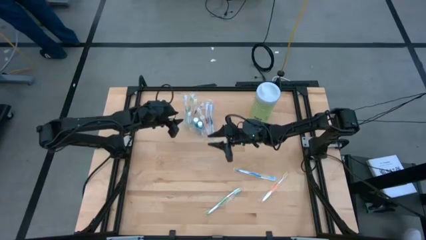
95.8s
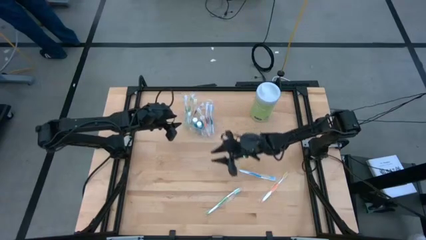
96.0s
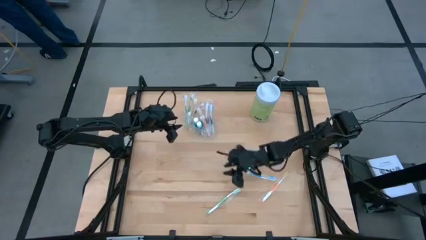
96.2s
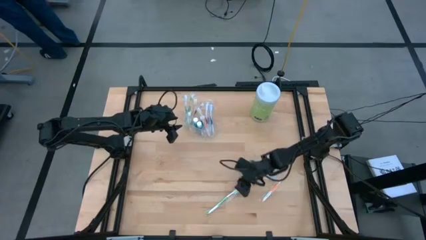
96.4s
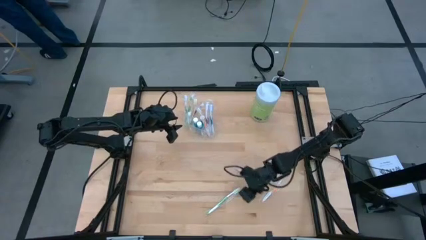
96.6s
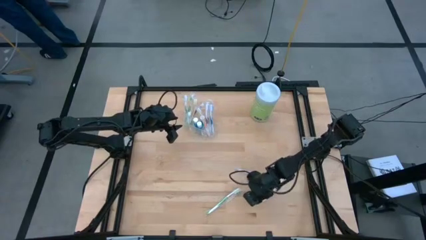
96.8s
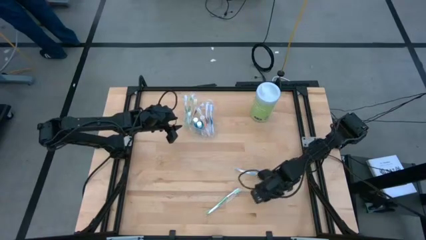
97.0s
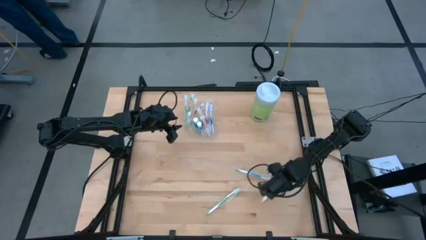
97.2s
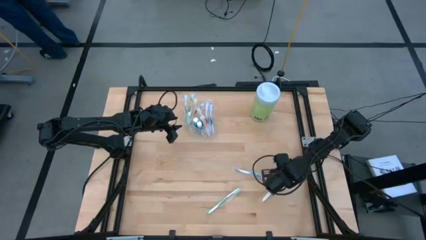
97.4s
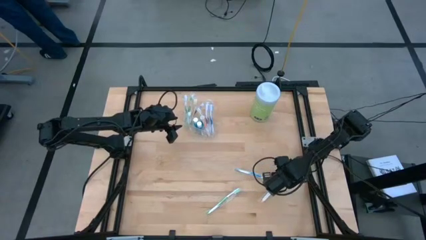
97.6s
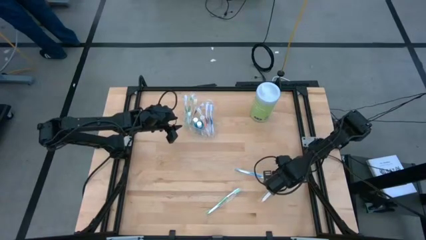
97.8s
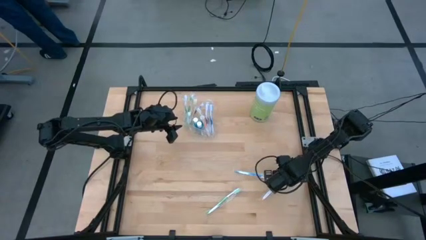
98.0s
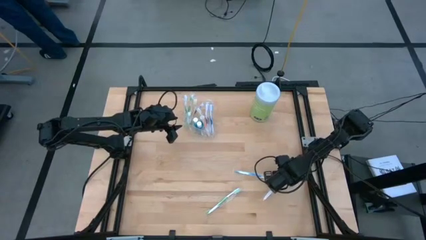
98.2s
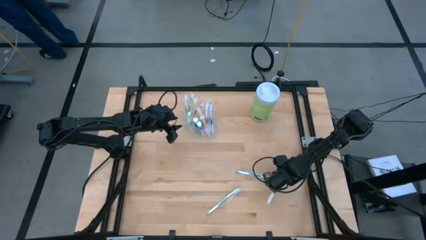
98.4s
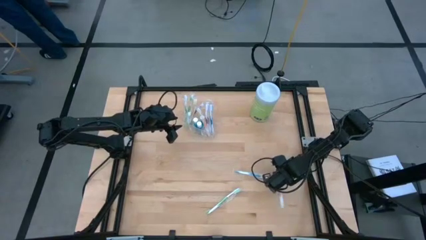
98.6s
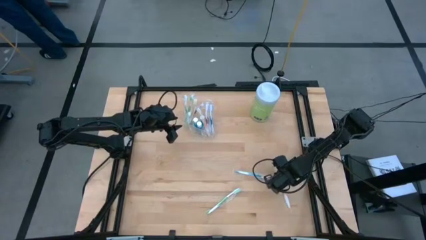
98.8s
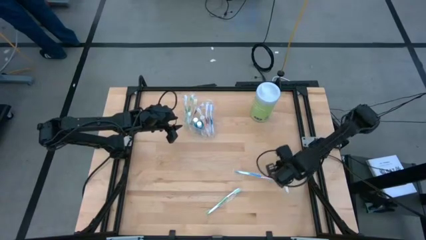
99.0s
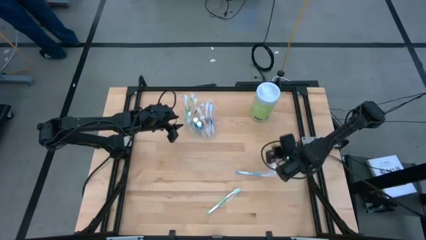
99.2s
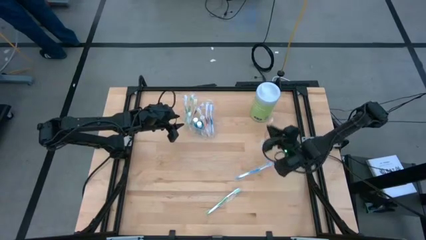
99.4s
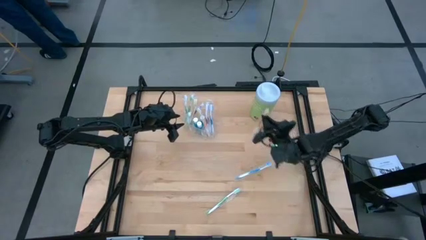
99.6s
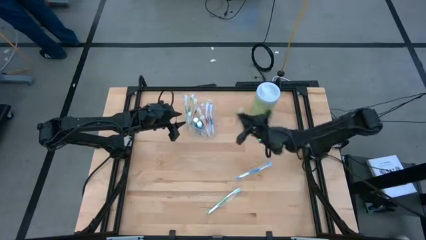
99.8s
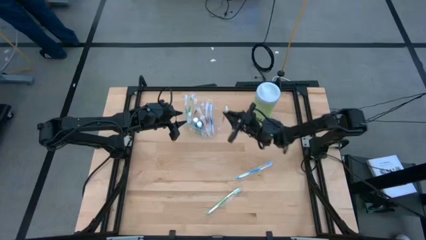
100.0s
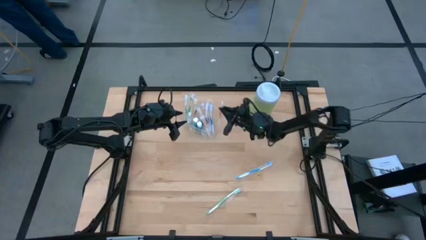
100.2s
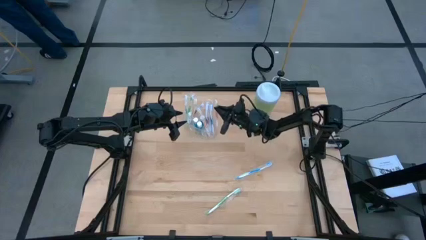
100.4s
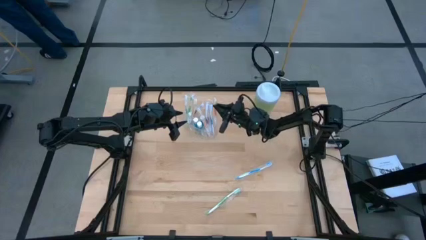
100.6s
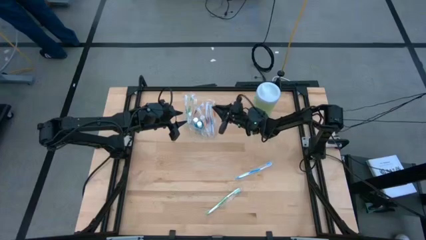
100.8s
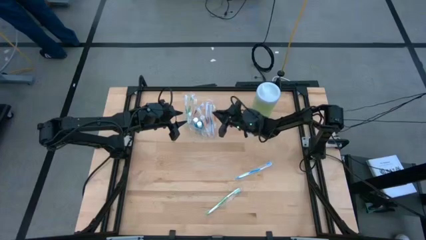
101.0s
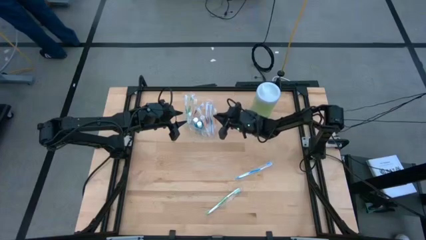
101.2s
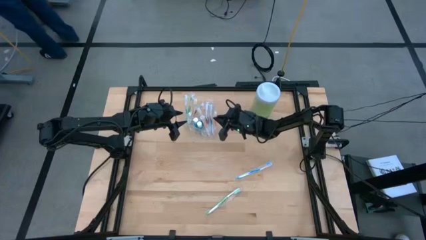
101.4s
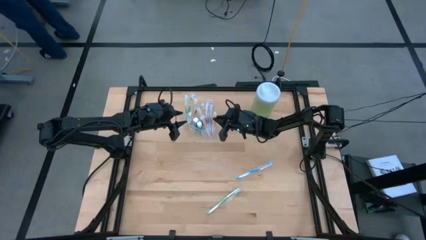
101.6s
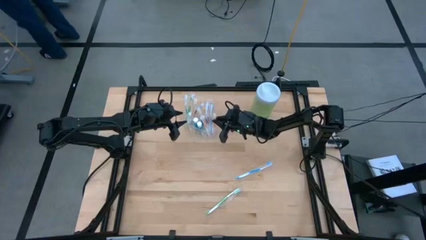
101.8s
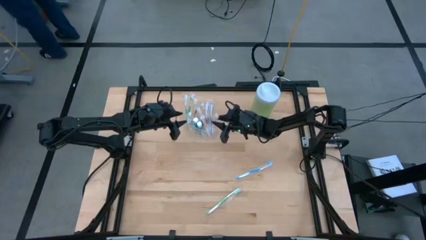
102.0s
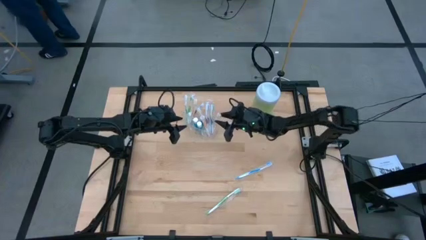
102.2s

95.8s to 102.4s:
Task: Pick & Place toothbrushing station
Put the orange toothbrush into the transparent organizer

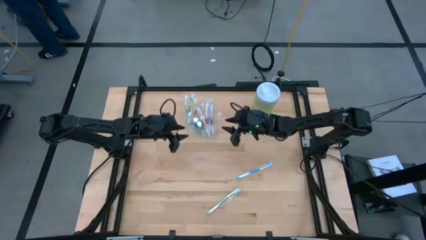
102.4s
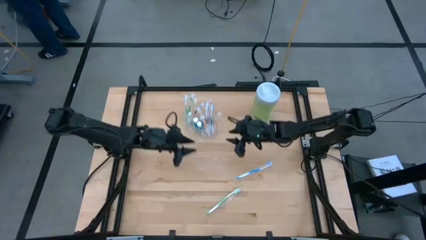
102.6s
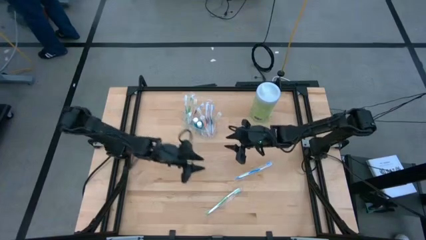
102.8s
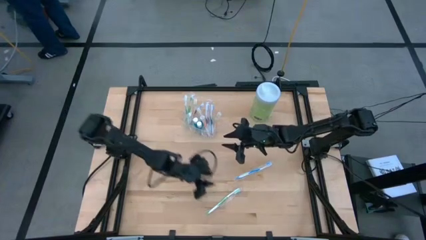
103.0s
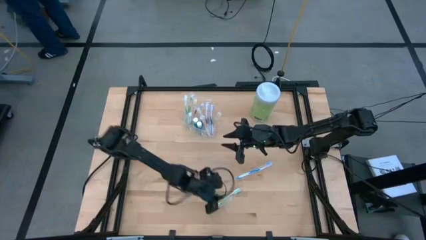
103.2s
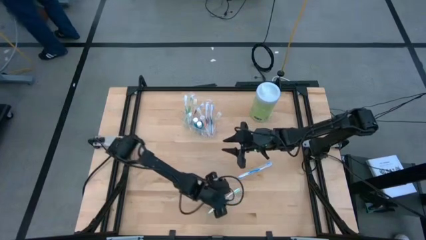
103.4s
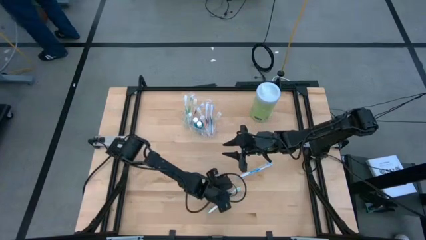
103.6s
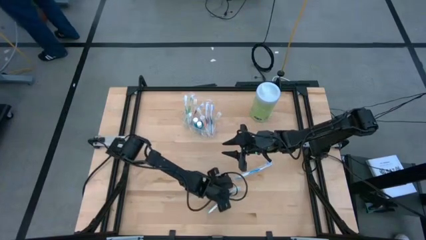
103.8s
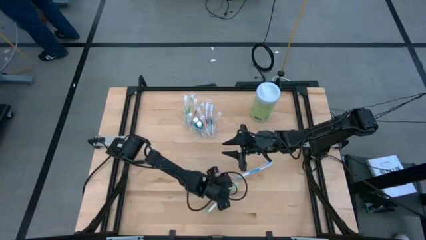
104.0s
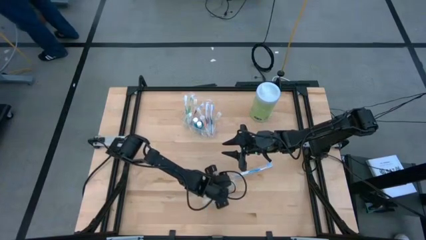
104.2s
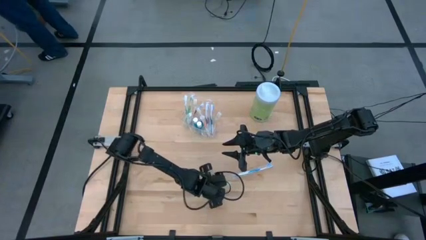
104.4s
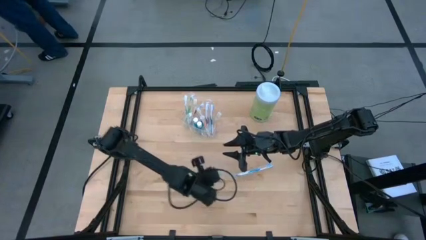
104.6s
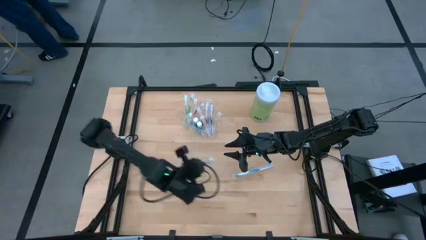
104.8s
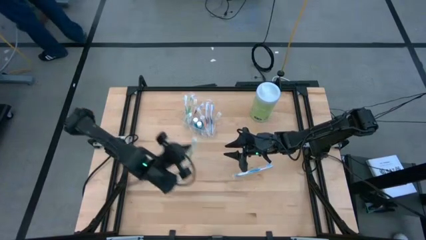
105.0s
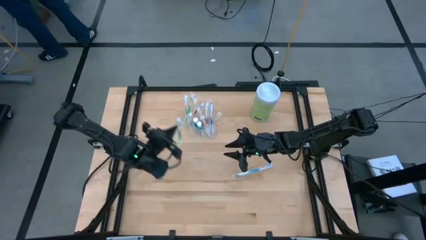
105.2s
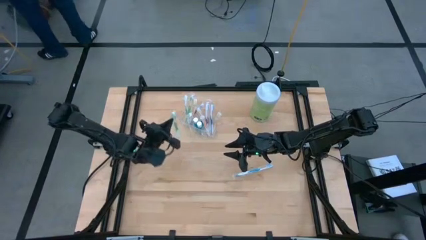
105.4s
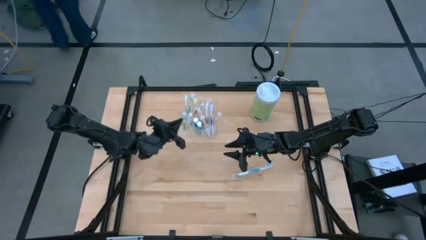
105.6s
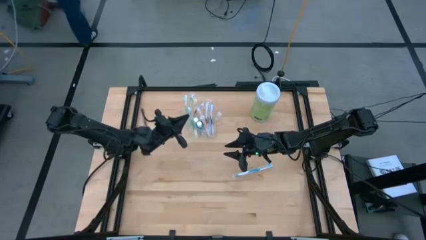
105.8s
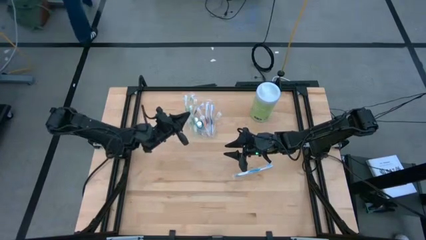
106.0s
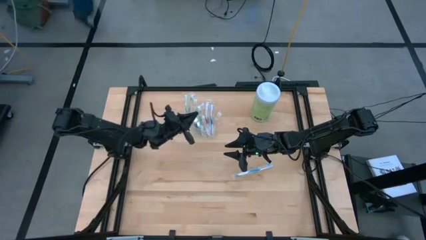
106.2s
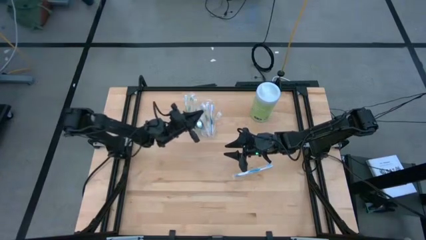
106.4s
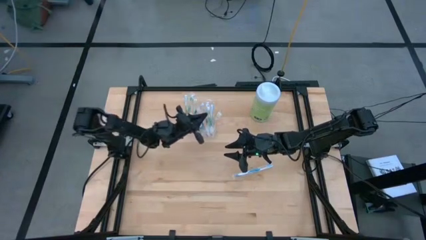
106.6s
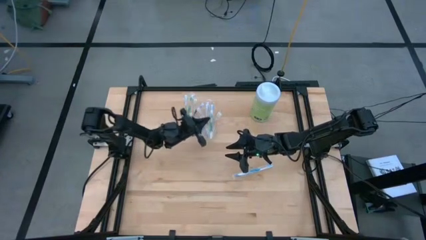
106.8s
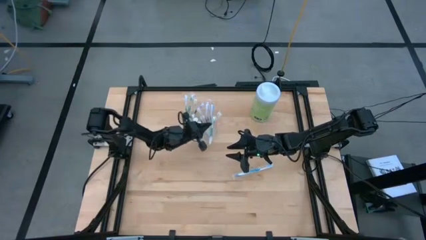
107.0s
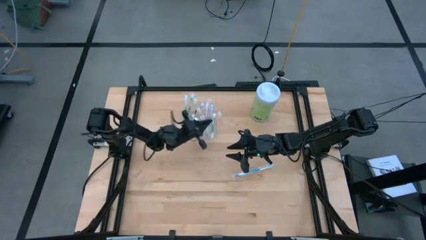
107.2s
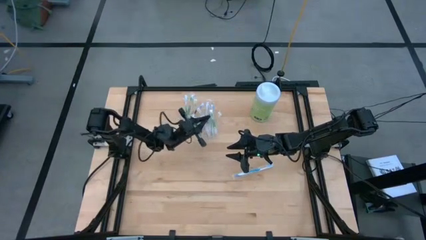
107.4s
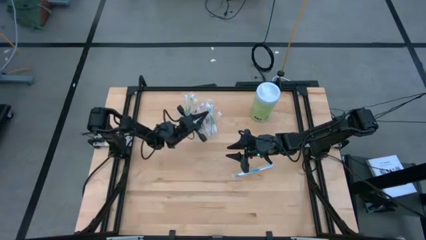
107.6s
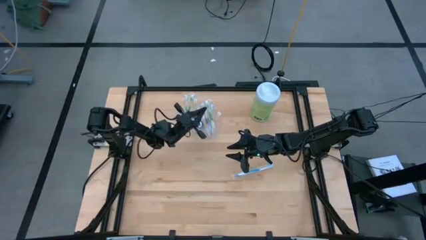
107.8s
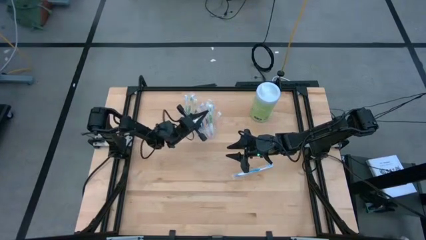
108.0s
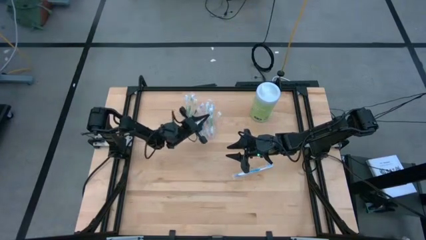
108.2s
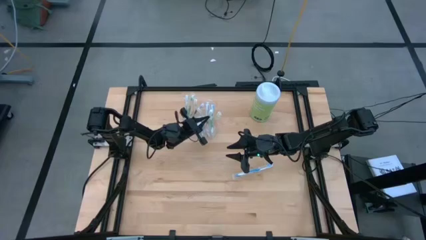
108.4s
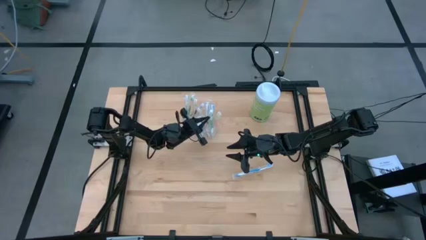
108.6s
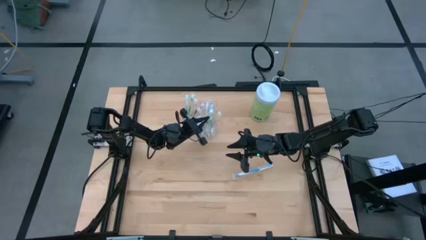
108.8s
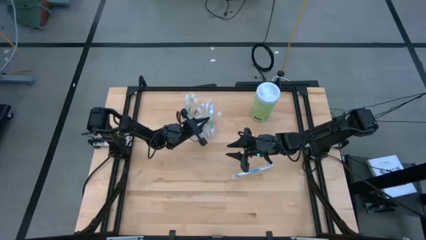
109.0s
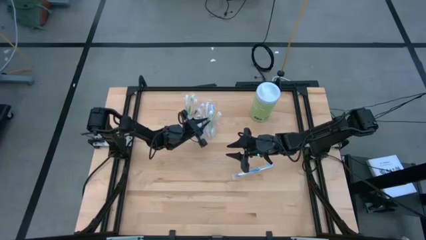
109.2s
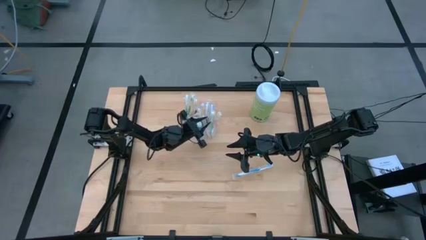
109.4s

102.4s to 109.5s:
Put the green toothbrush into the transparent organizer

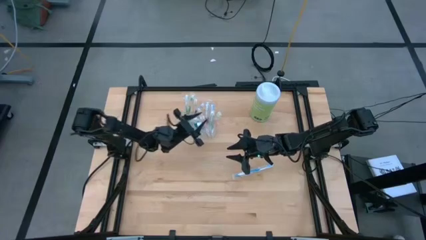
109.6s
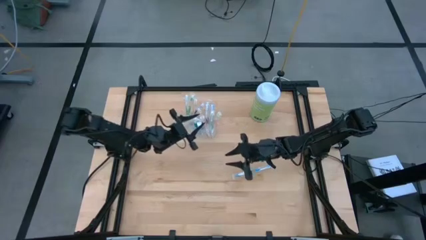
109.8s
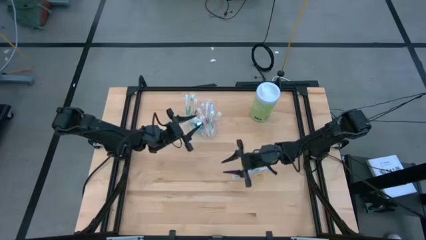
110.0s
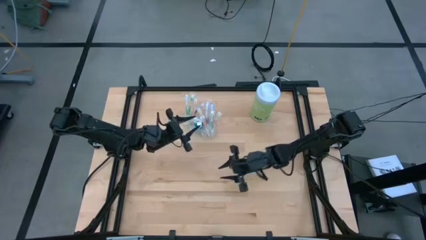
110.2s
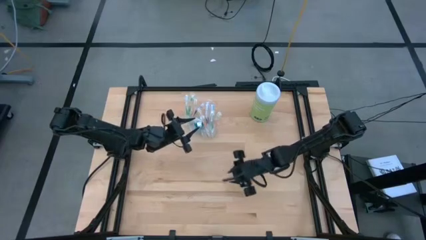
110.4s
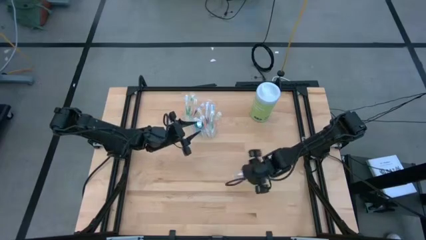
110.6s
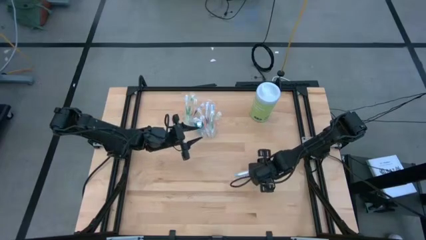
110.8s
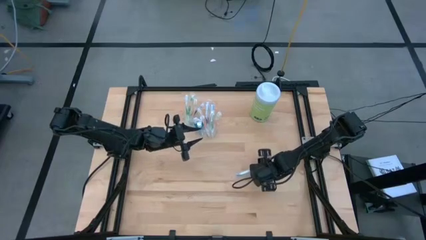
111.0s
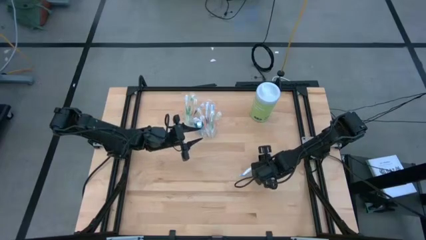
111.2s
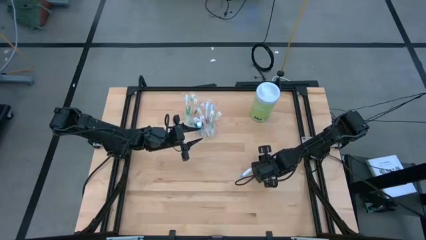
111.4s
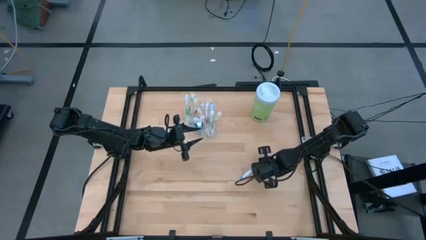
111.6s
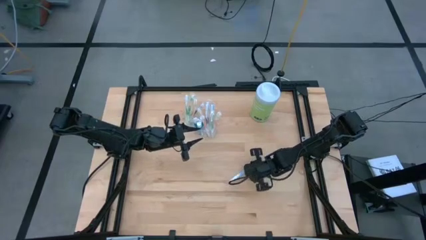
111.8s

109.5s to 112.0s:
Put the blue toothbrush into the transparent organizer

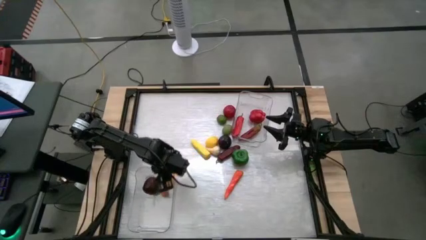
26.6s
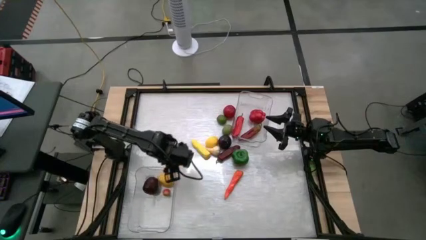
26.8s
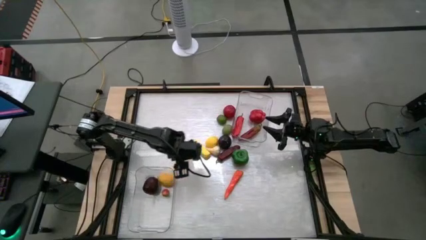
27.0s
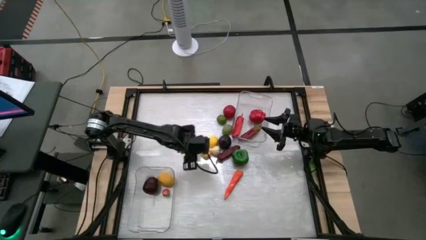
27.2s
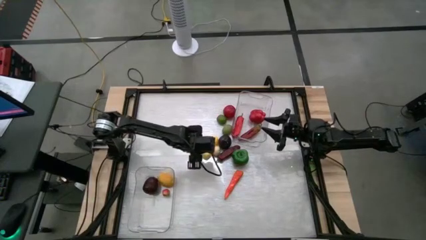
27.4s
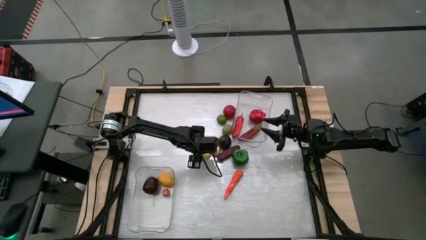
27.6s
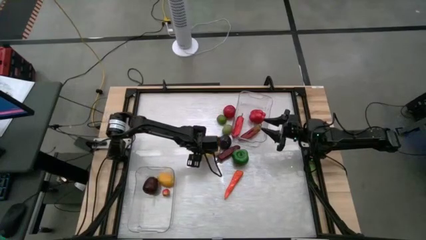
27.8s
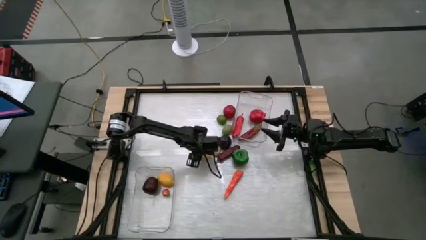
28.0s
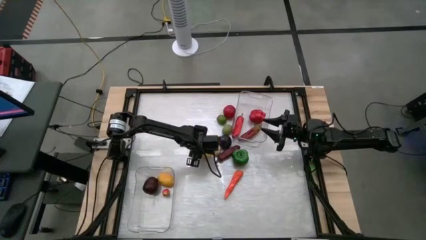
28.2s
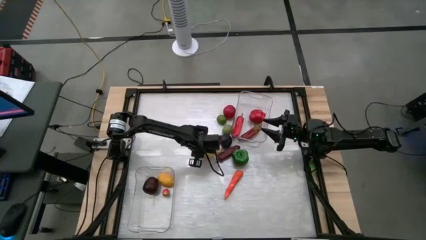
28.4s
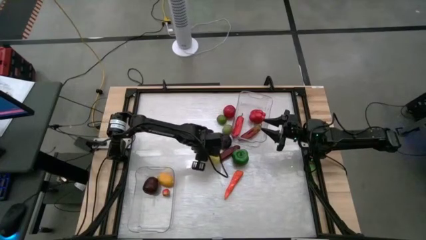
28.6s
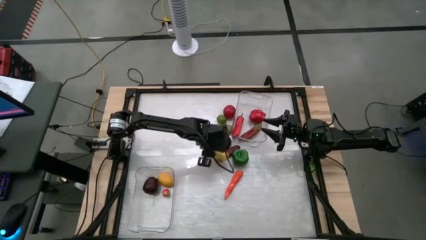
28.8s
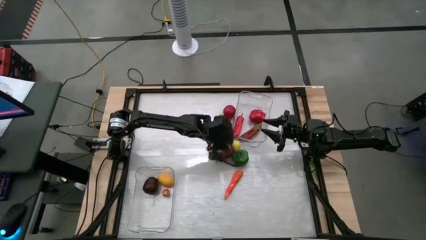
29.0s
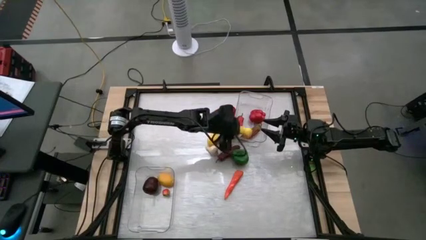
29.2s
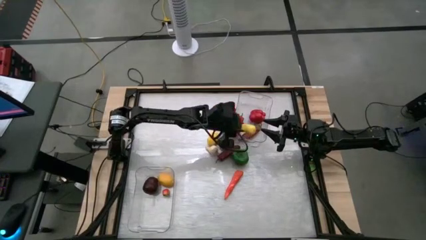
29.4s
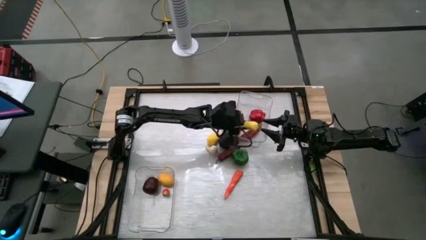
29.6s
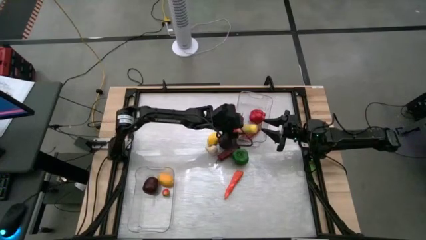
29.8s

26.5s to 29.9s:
Task: Sort produce into baskets
Put the yellow corn into the top transparent bin
